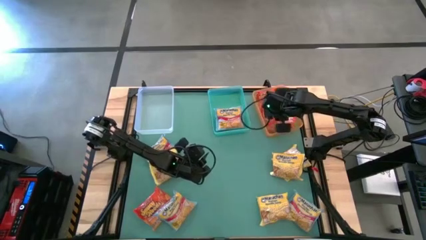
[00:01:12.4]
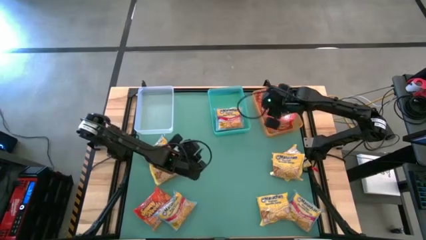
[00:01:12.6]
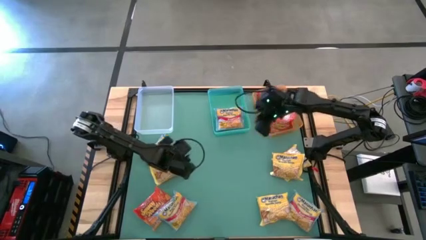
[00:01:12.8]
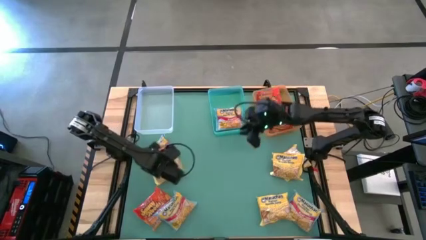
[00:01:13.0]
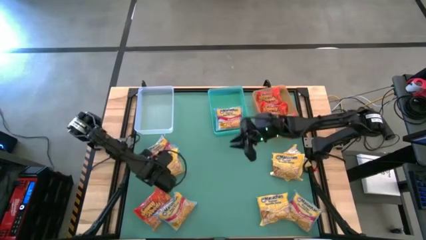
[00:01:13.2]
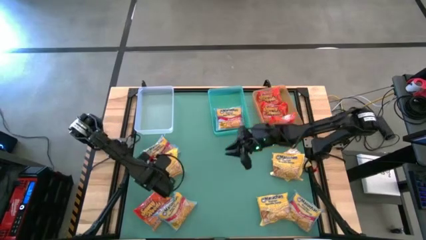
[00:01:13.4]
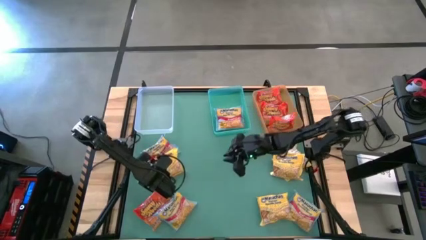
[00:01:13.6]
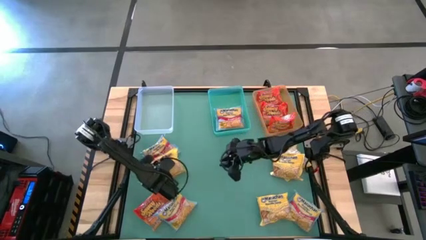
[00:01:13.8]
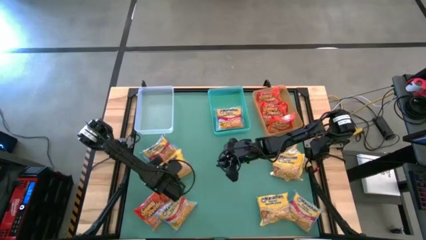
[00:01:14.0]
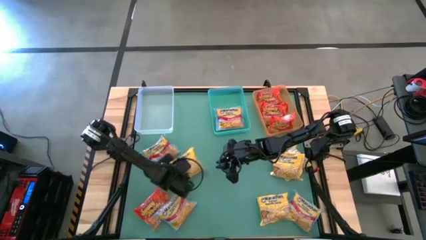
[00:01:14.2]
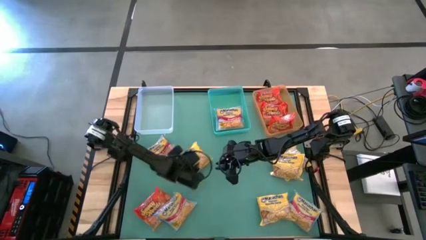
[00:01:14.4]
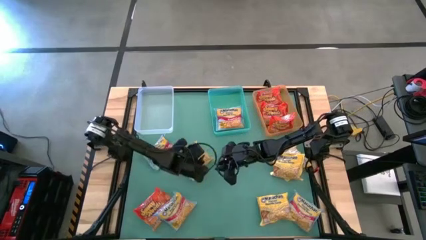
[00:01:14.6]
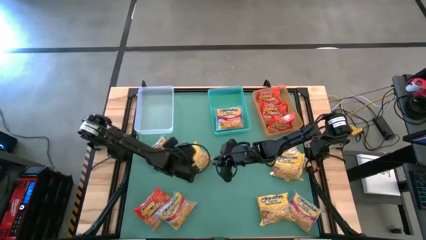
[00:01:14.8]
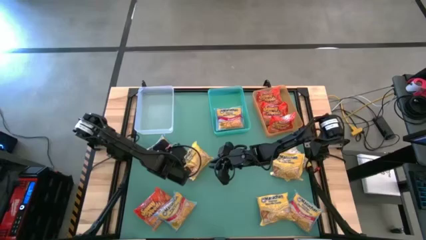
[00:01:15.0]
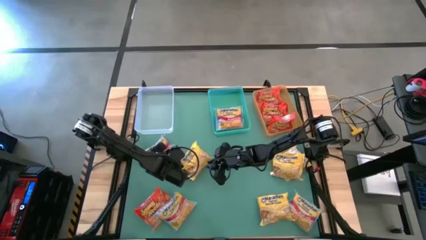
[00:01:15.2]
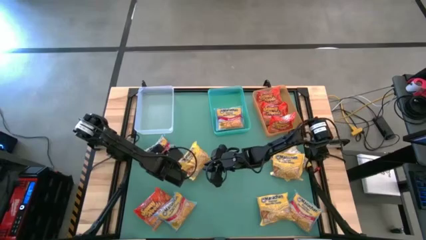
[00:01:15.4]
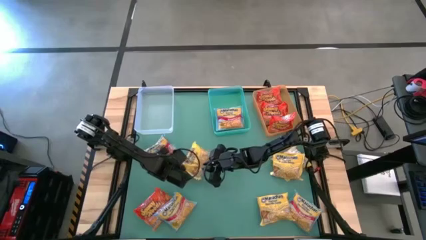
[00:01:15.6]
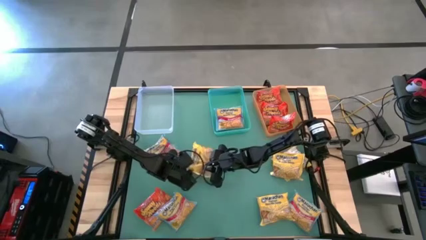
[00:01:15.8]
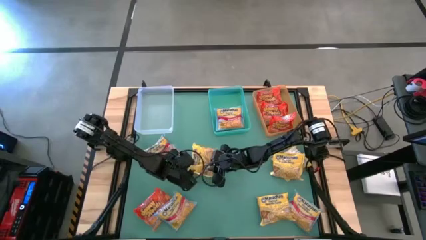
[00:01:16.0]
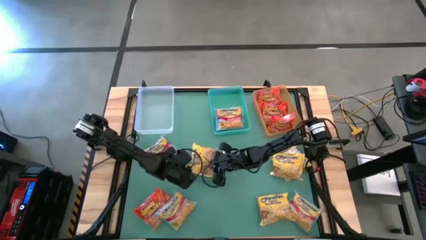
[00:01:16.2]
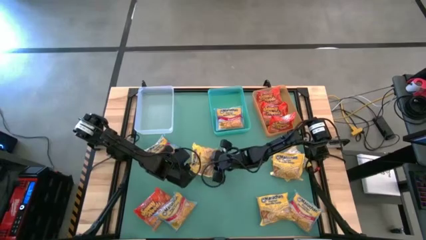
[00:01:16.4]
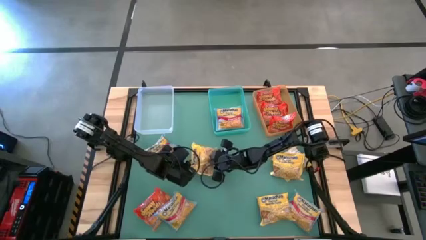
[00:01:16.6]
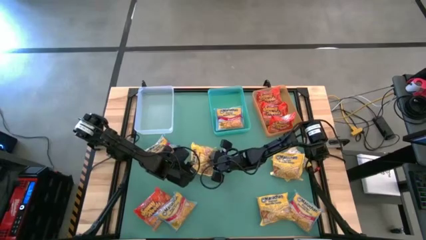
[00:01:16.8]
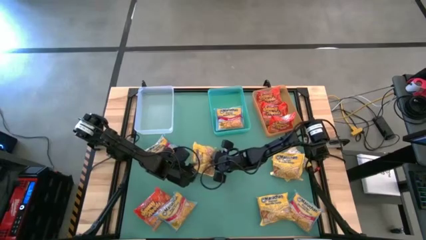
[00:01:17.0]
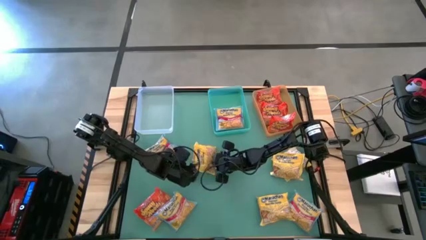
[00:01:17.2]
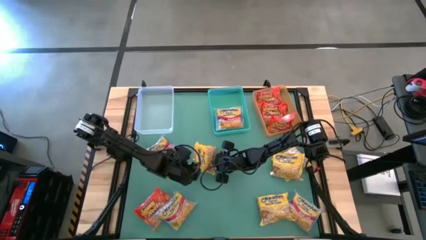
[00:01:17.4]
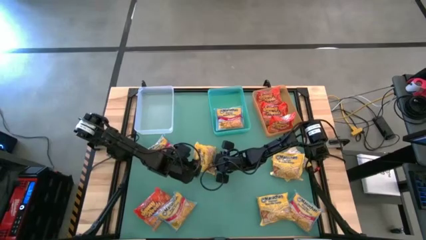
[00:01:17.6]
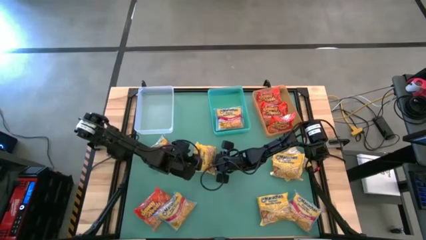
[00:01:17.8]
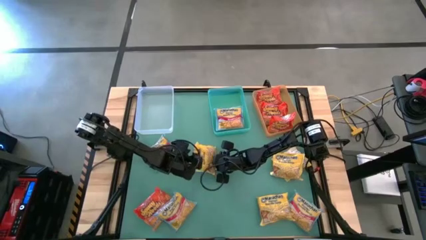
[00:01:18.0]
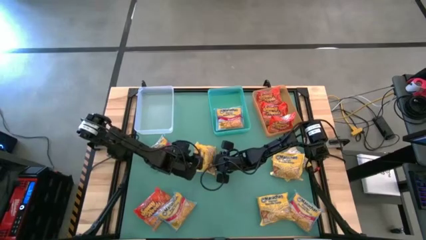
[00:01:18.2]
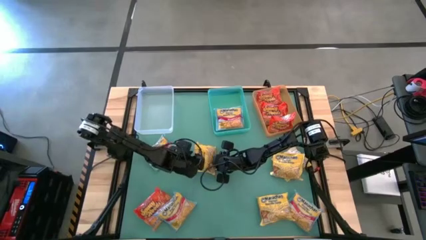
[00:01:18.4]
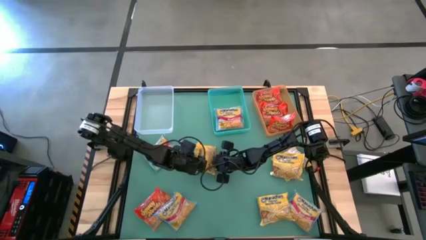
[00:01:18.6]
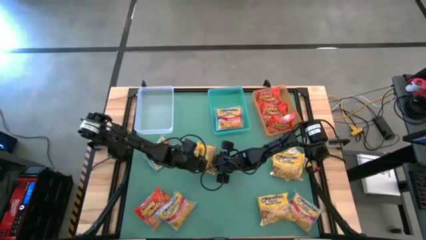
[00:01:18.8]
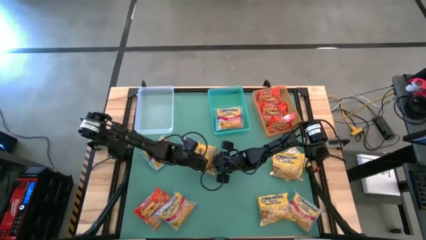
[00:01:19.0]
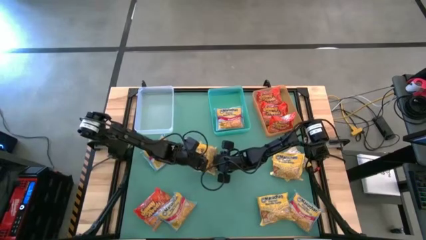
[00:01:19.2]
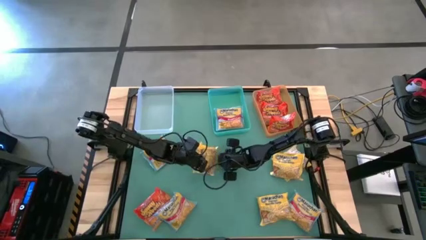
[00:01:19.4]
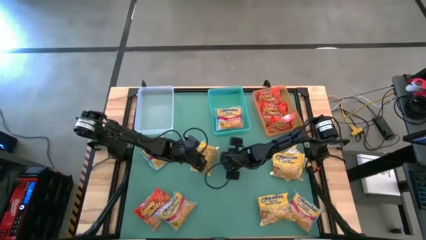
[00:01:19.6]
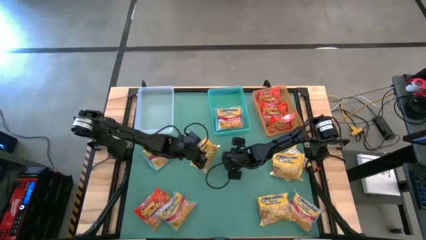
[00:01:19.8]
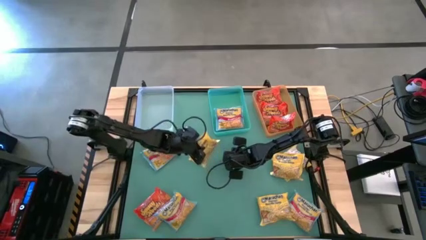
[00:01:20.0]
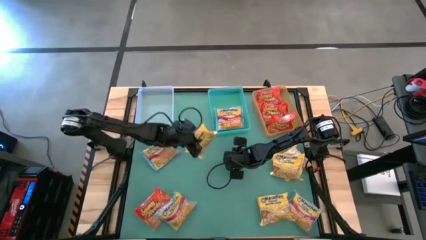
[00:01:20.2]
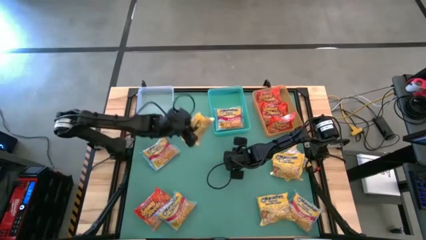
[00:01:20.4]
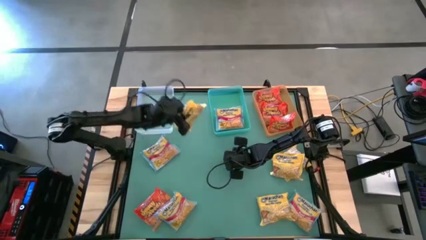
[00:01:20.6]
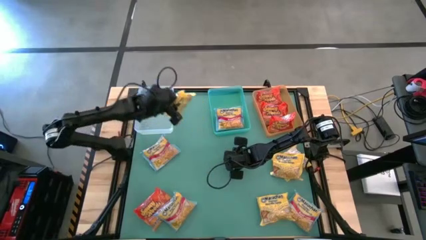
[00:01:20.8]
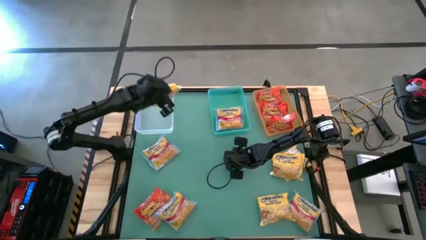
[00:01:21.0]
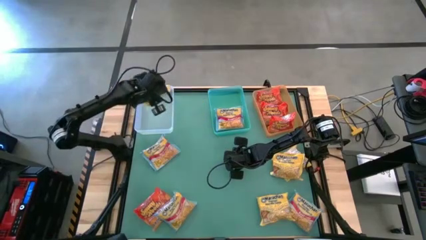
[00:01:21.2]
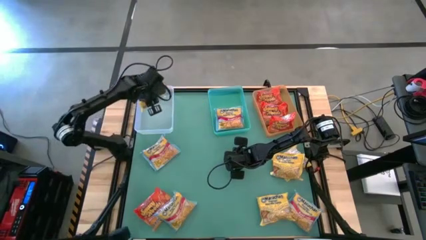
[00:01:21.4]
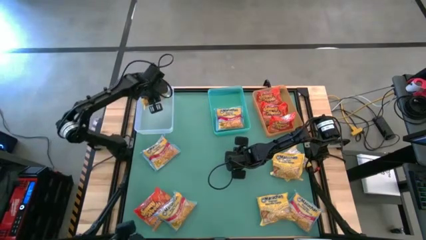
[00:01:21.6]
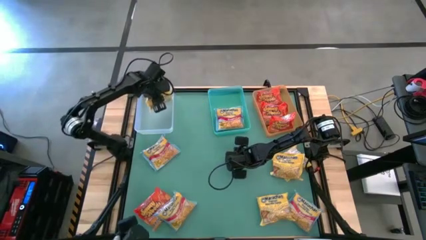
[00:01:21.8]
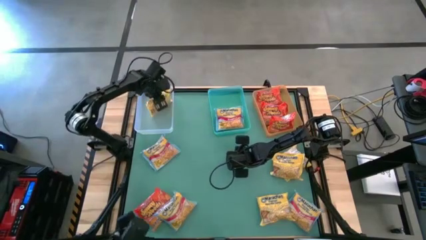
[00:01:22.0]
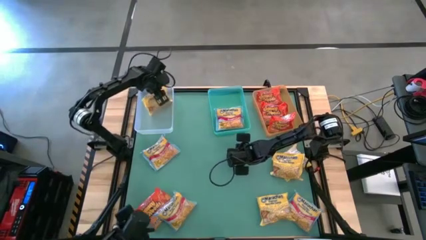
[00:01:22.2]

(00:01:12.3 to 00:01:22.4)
Task: Sort Maruchan noodles
Put the yellow noodle pack into the white bin
